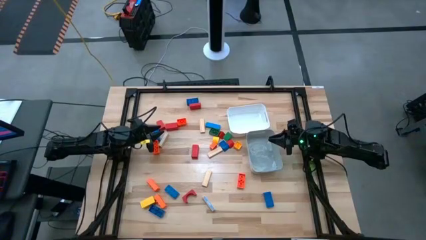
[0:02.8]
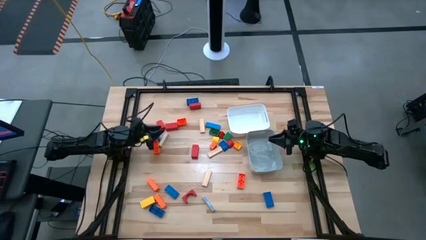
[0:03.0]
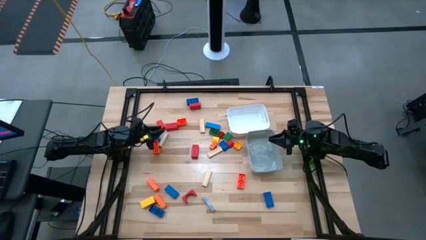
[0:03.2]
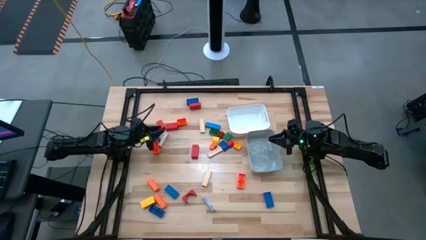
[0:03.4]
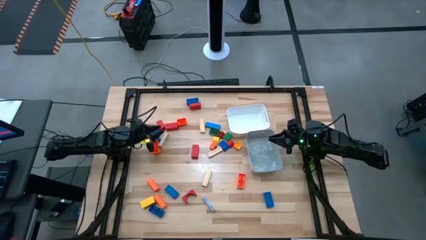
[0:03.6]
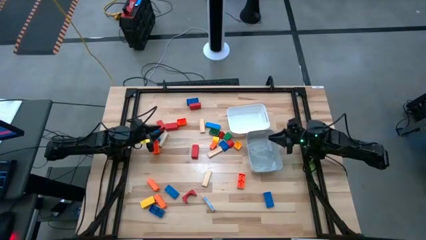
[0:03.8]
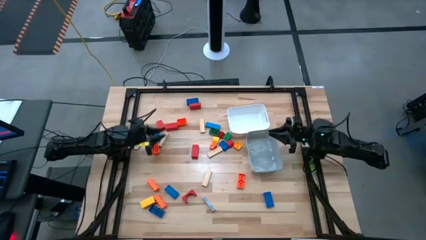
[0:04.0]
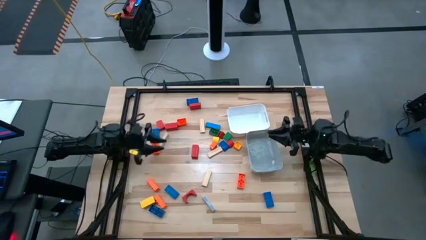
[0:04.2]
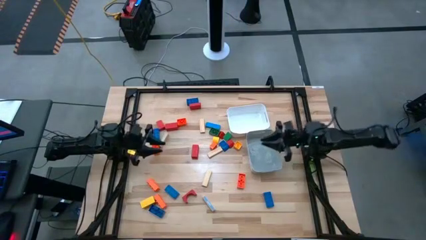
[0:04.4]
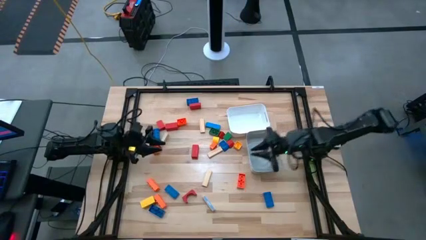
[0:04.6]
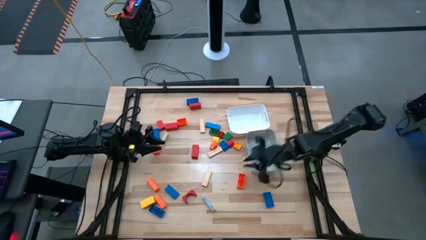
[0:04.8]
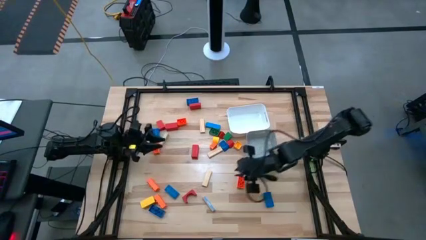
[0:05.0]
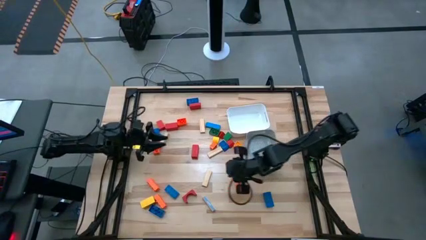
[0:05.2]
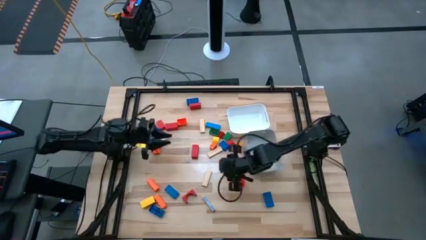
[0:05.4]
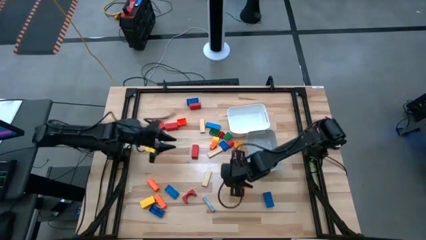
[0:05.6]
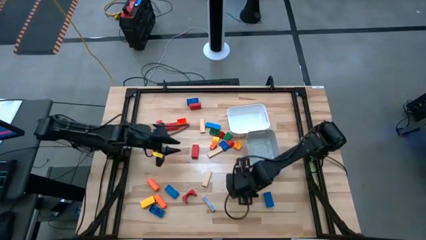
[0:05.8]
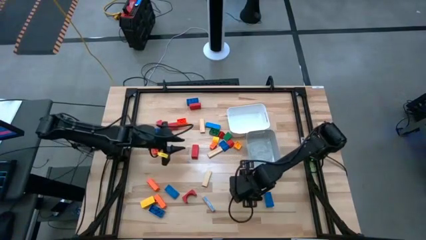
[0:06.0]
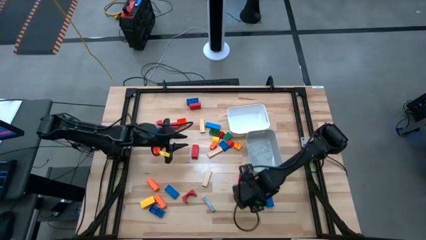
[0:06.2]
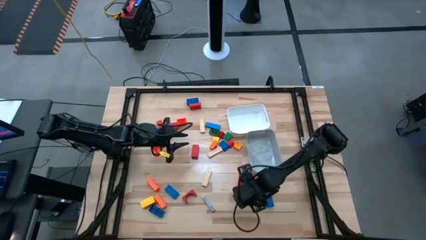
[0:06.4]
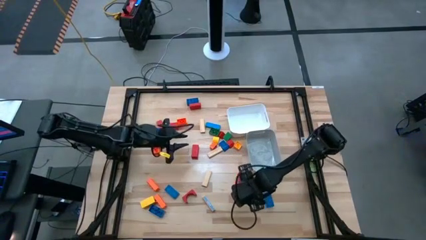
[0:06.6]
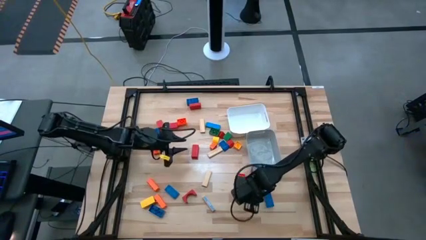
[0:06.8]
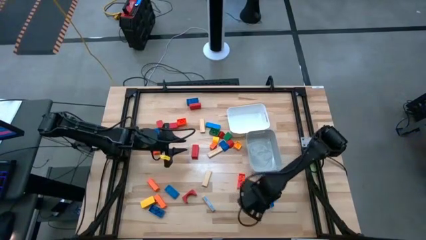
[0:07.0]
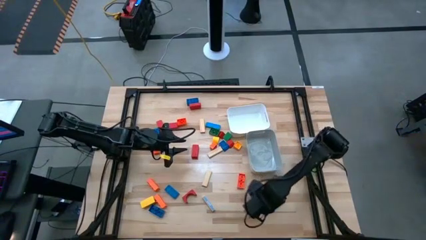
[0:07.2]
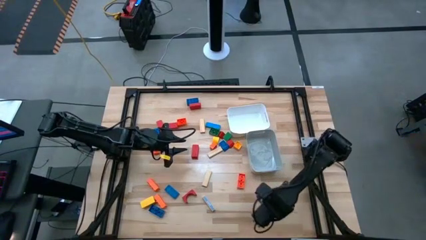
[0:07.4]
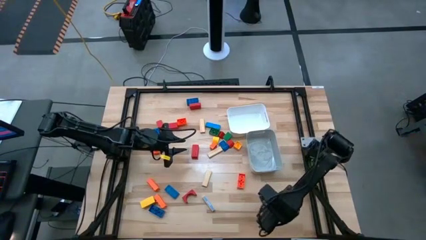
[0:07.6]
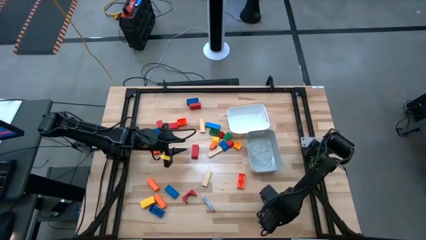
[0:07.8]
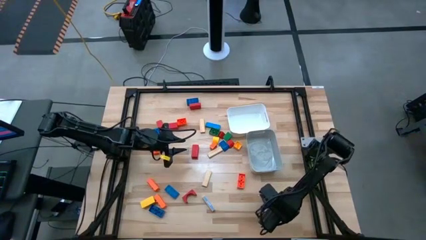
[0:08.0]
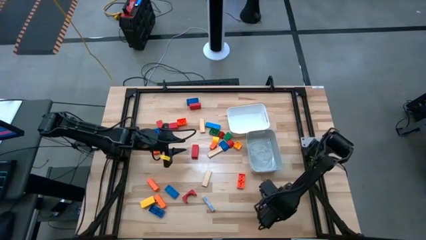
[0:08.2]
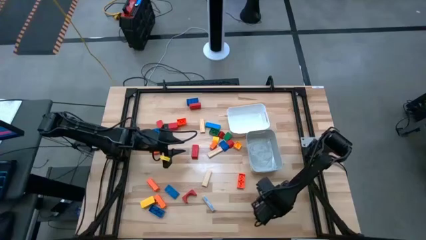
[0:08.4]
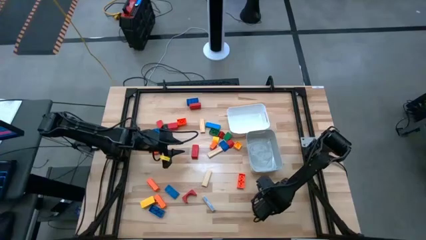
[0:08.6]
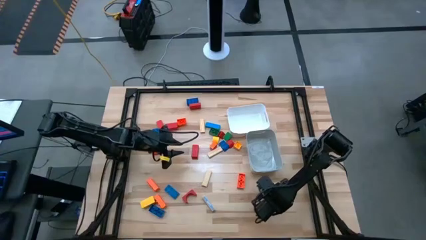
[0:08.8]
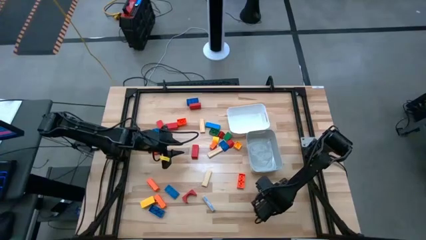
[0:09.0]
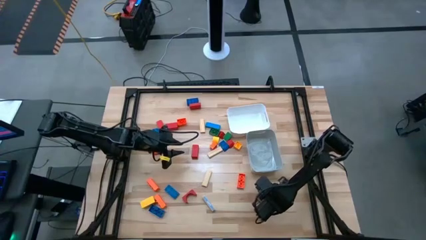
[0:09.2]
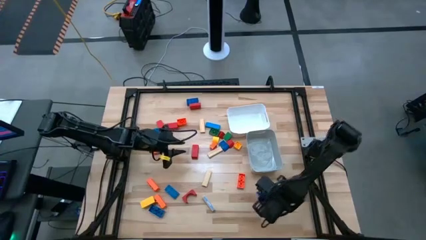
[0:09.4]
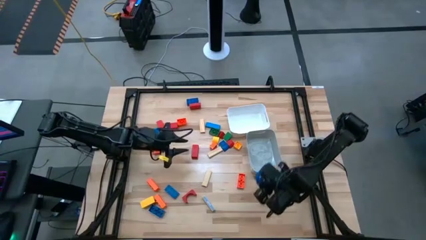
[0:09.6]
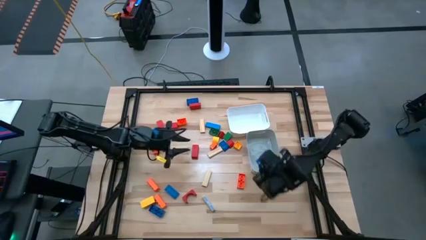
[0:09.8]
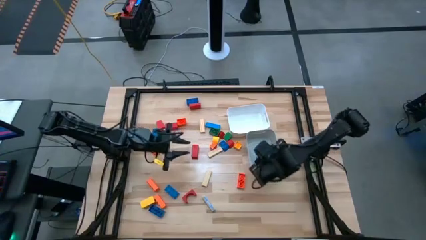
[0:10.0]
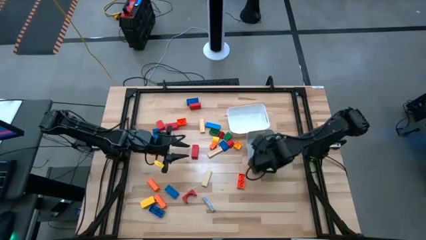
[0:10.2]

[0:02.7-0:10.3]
Task: Sort blocks by size
Put the large blue game piece into the gray bin

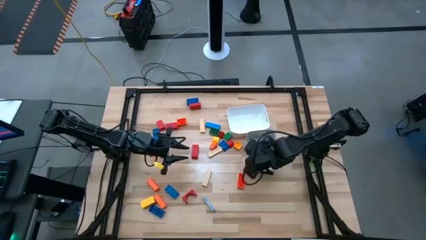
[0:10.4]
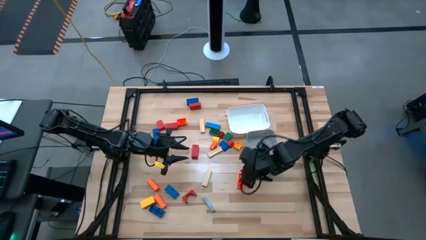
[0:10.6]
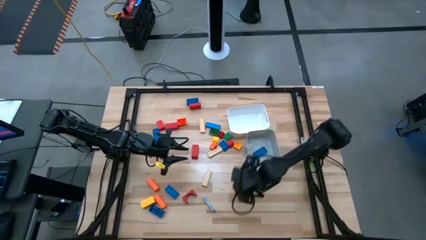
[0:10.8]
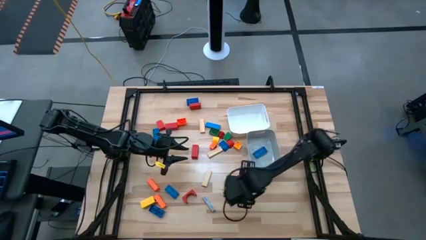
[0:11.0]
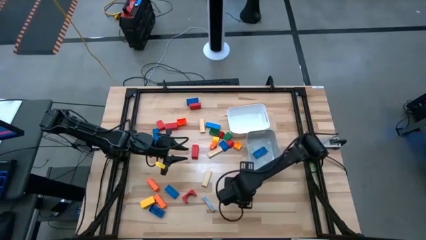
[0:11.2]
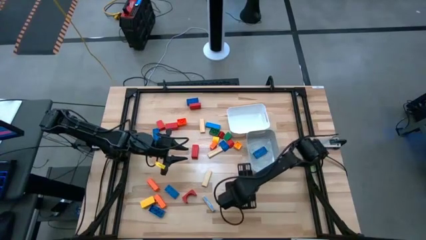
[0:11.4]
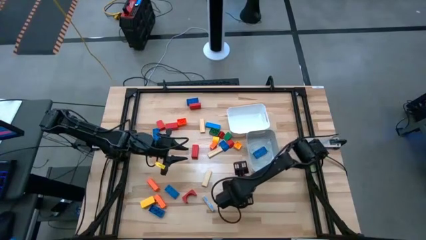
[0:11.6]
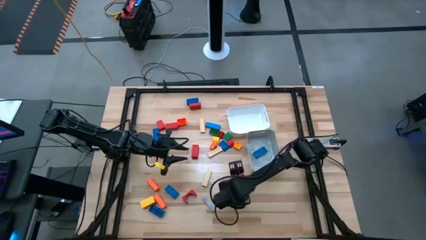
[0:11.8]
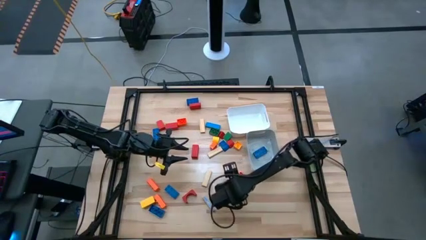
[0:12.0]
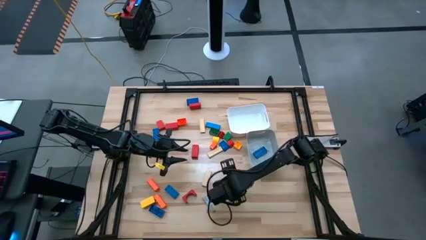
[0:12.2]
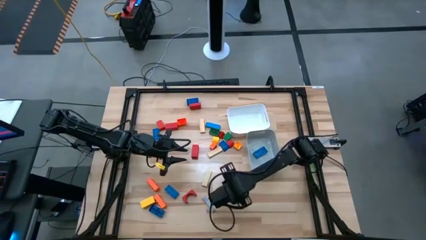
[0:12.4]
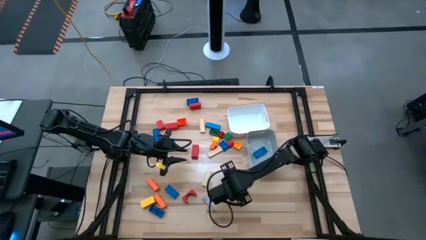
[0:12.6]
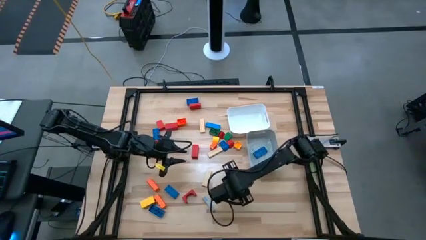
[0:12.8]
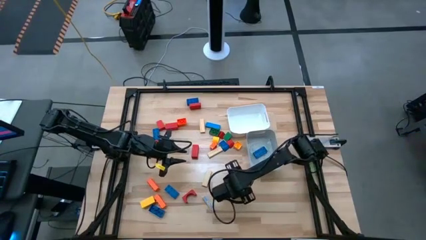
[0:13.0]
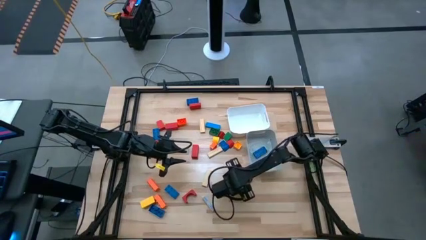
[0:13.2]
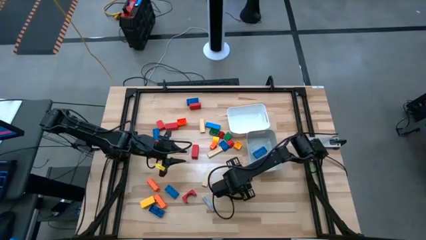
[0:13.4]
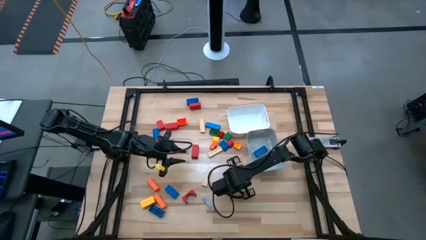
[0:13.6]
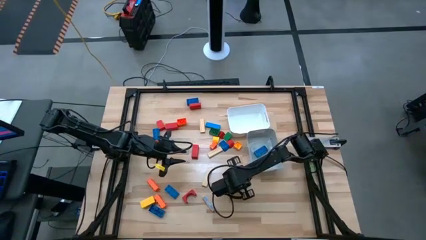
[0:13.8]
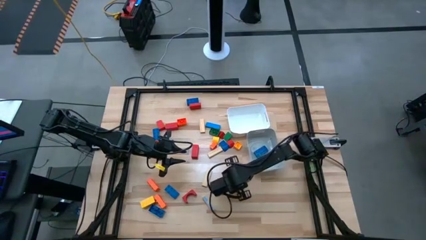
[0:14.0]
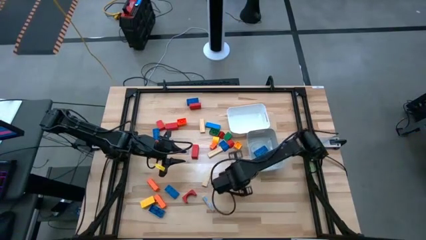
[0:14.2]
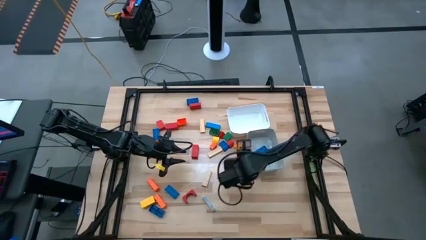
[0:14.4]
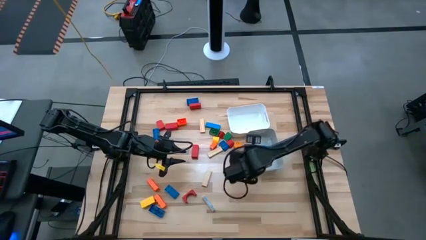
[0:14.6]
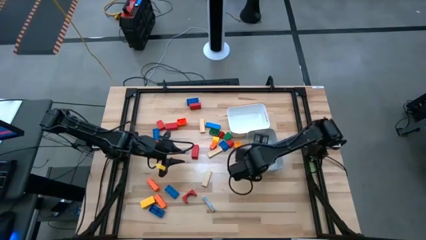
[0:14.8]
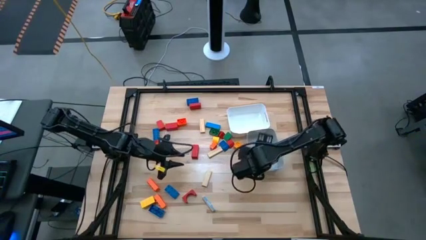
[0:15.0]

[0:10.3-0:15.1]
Put the large orange game piece into the gray bin

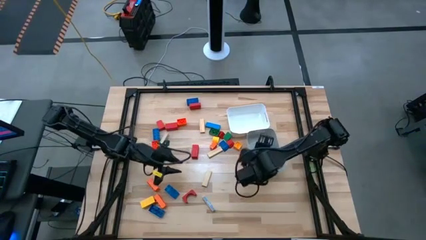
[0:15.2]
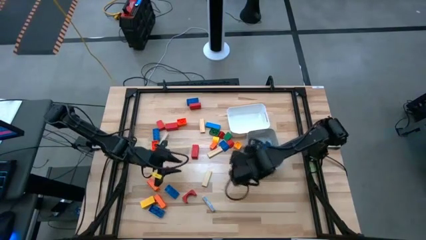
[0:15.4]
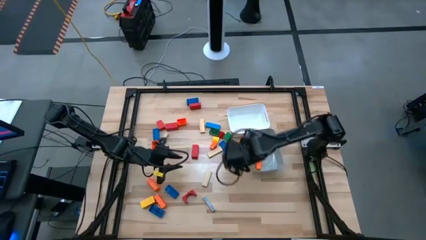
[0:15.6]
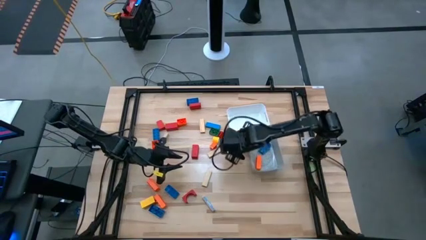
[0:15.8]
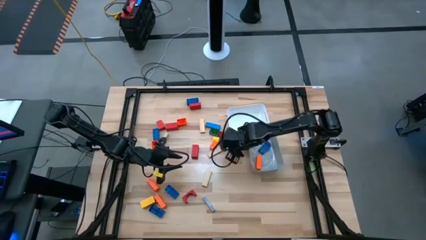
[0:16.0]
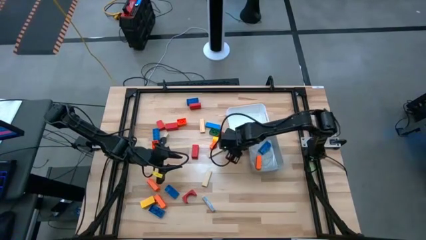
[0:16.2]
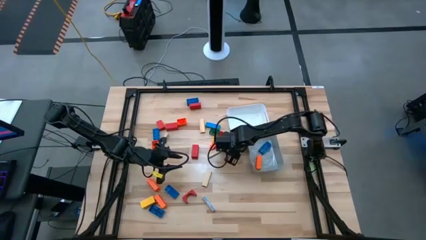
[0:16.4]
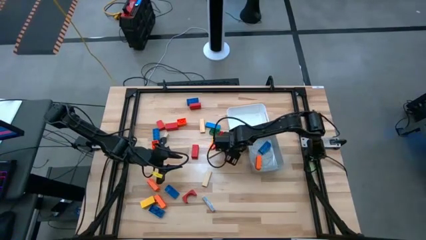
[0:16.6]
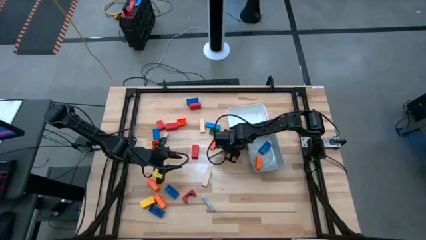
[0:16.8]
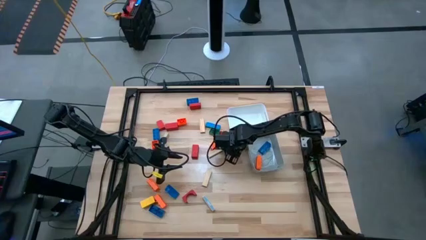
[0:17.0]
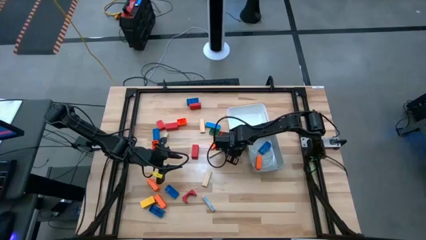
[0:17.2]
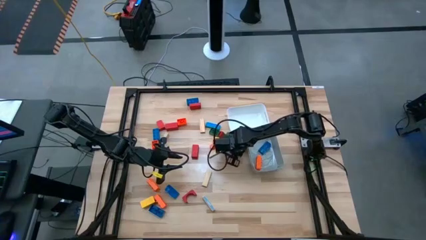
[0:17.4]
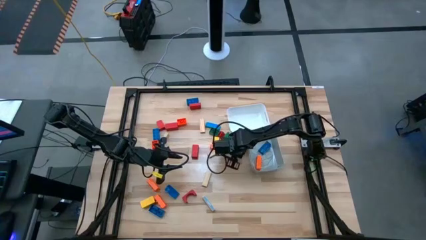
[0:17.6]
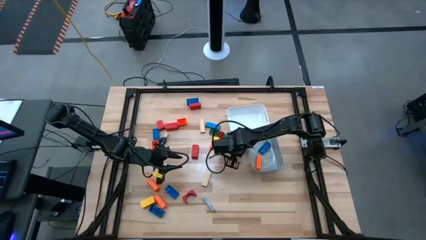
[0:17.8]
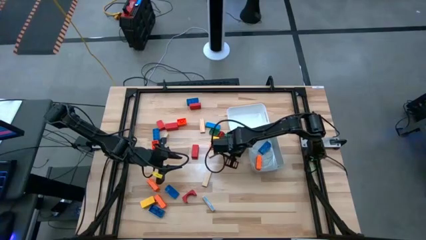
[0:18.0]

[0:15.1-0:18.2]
Put the small yellow game piece into the white bin

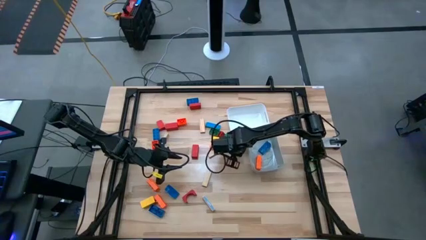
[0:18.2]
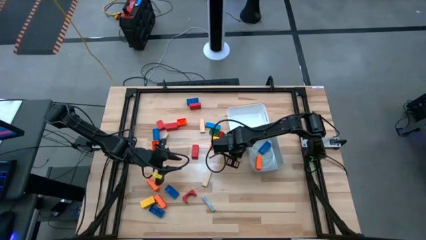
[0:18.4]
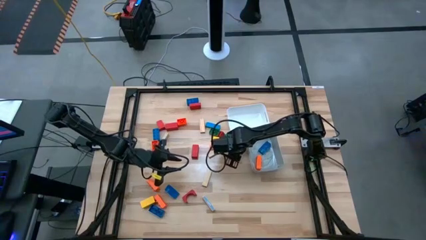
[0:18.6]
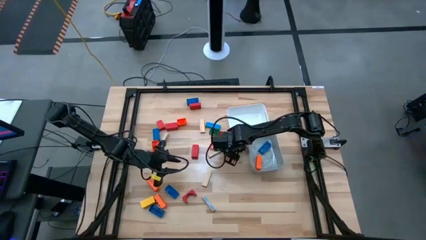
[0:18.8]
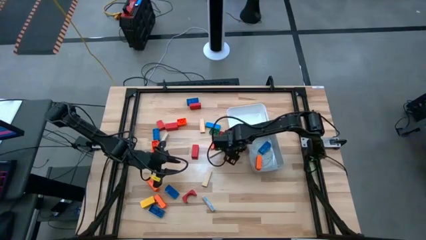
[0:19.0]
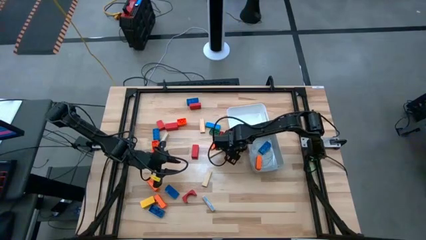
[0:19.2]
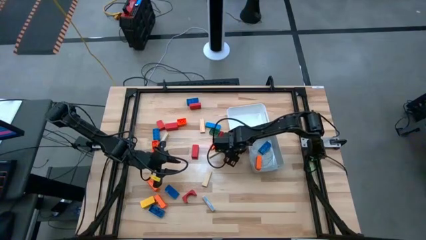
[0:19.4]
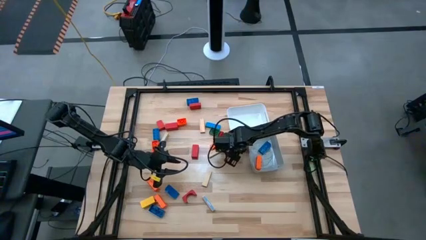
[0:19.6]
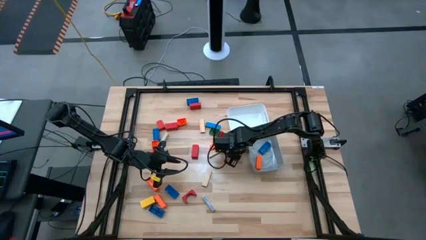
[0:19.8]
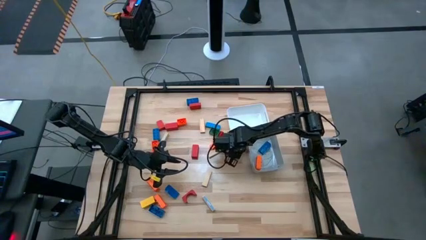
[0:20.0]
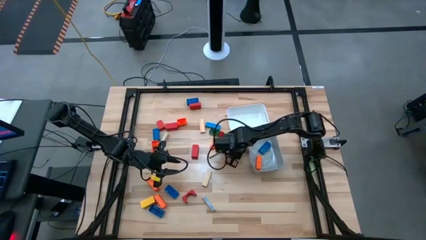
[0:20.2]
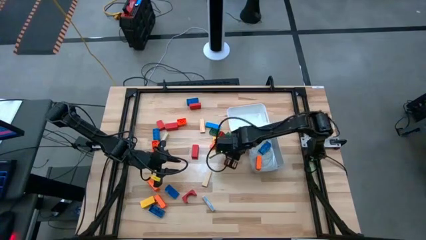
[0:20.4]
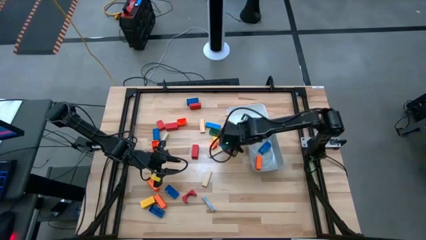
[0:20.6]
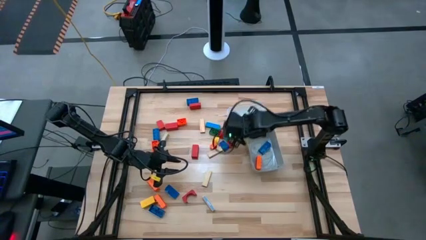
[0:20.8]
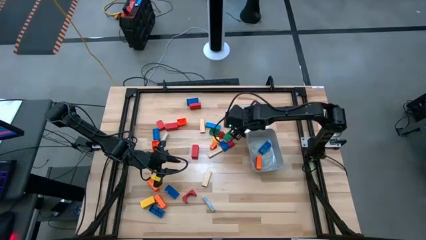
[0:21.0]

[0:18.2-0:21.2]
Put the small yellow game piece into the white bin
